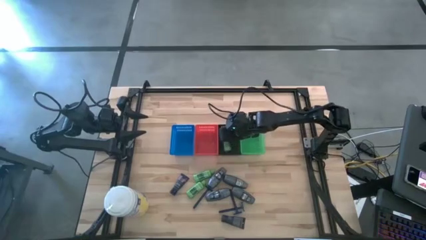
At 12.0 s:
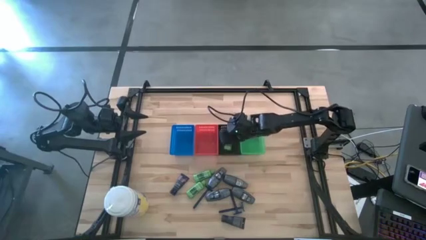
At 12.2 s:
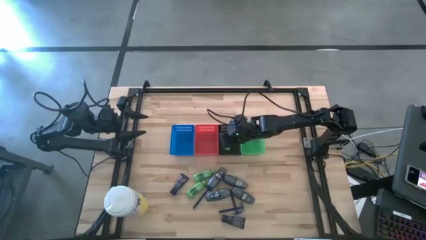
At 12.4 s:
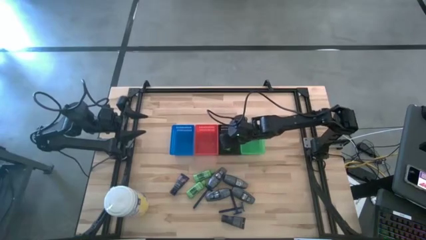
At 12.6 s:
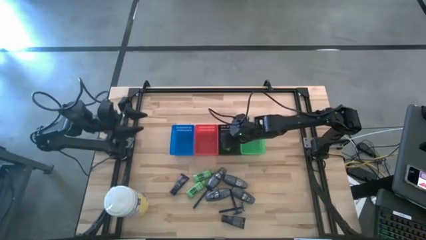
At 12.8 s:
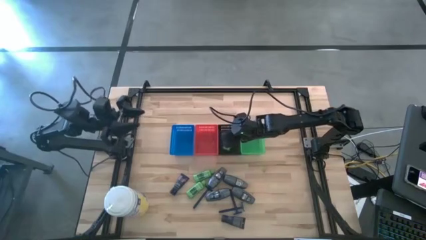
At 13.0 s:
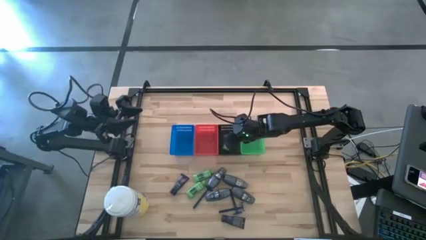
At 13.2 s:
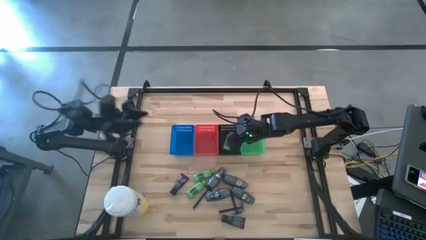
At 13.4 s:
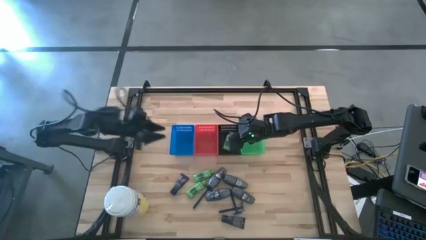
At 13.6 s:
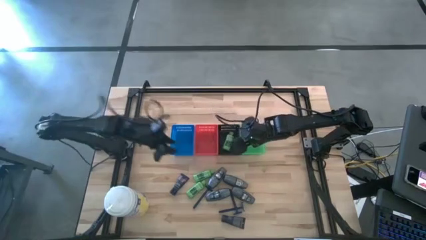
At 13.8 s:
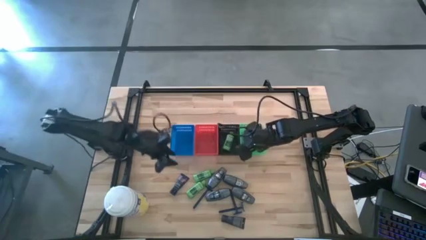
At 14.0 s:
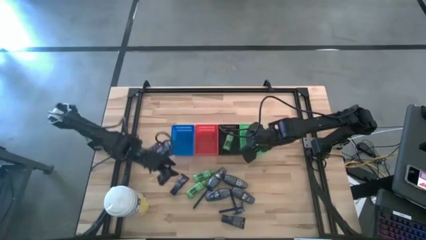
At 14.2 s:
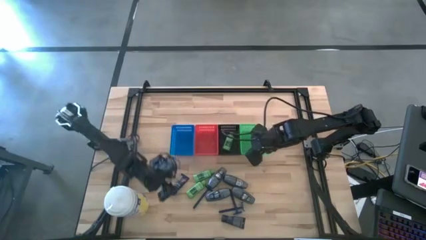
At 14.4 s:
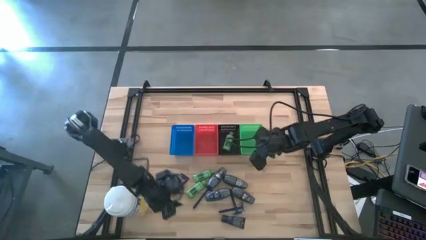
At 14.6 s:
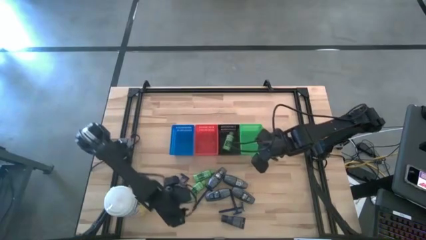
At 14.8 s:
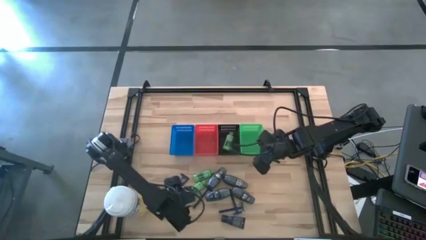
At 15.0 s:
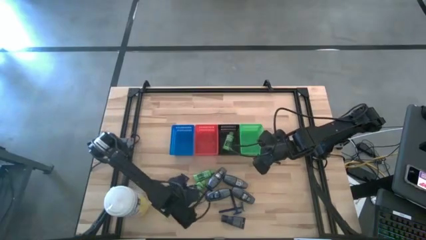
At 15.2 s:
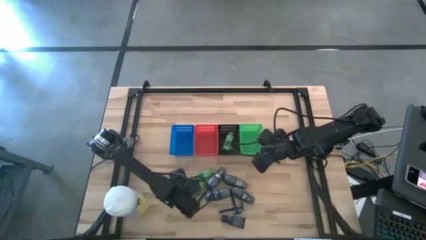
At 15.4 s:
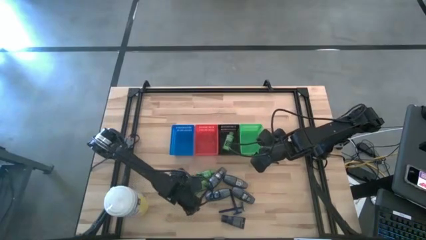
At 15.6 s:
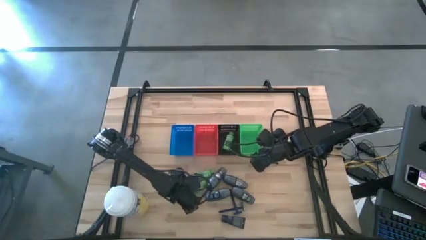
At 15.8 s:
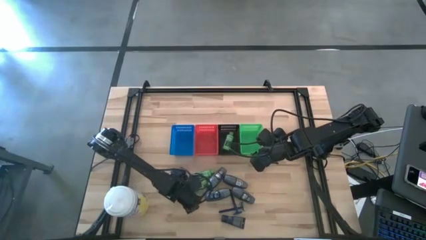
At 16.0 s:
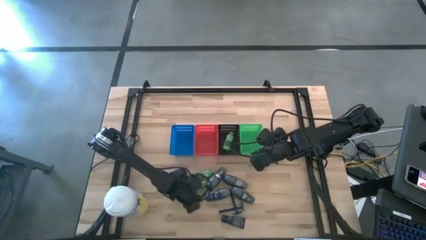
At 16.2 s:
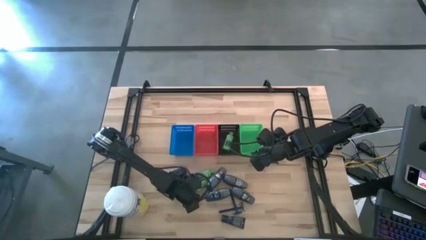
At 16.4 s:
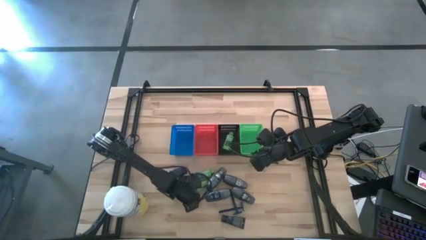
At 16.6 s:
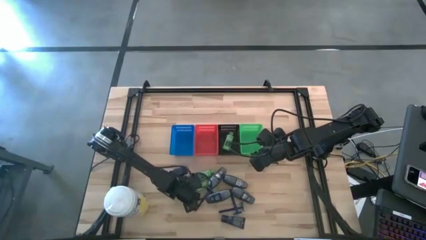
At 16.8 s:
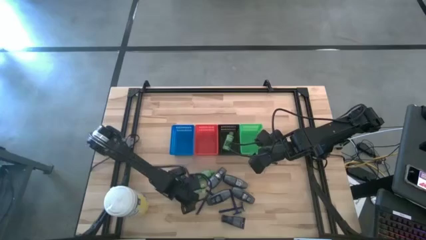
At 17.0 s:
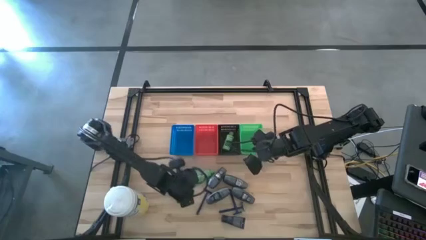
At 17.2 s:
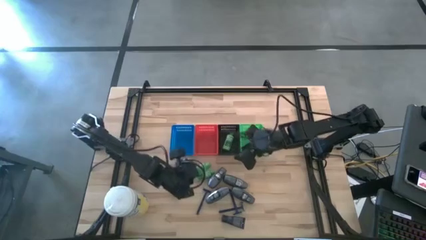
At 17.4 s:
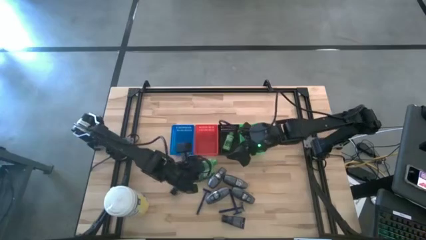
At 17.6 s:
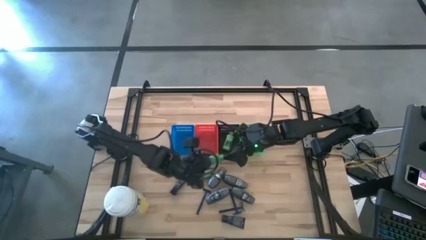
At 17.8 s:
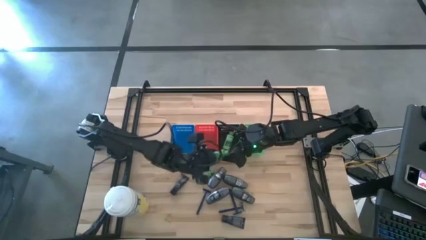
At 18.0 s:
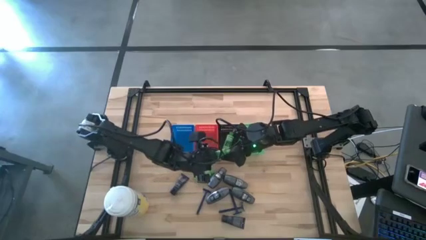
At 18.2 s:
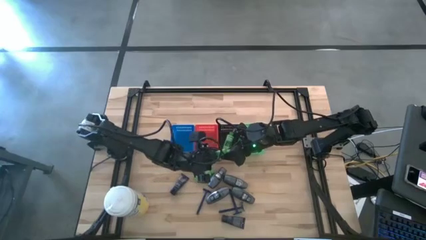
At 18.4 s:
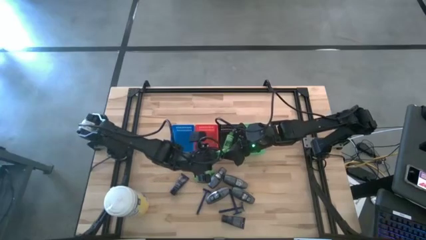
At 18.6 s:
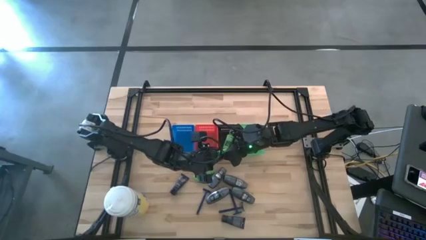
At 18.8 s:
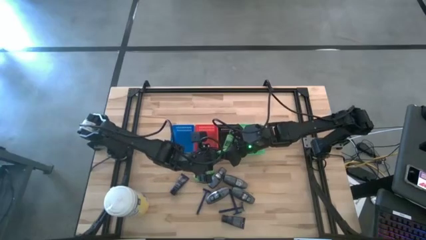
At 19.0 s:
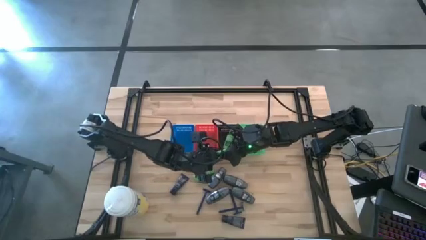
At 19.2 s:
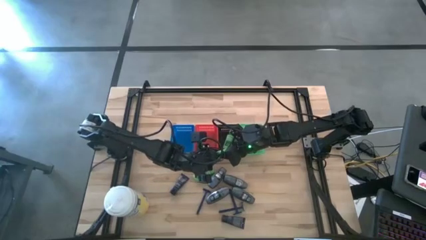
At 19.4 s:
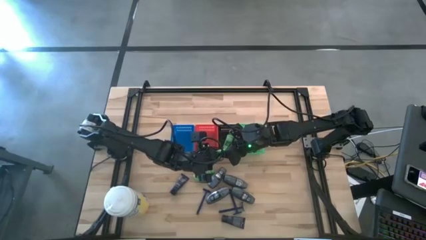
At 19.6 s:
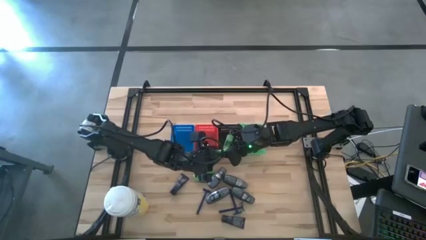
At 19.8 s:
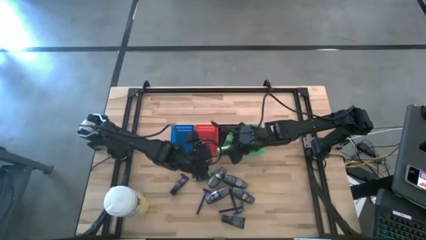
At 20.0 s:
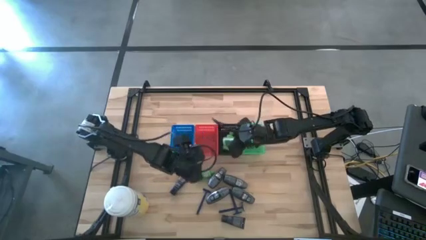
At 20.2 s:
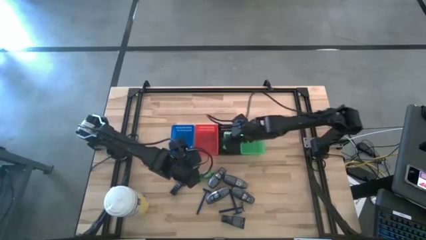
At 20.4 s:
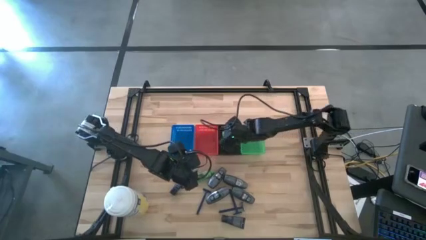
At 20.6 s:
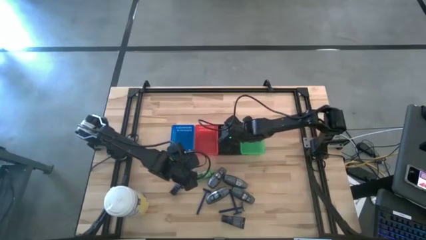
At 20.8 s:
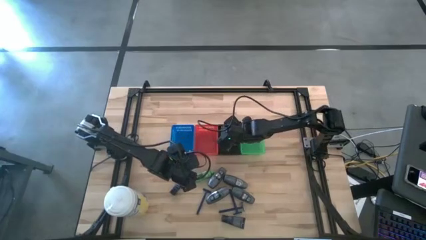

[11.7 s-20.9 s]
Task: Pick & Place Travel size toiletries
Put the shampoo into the black bin

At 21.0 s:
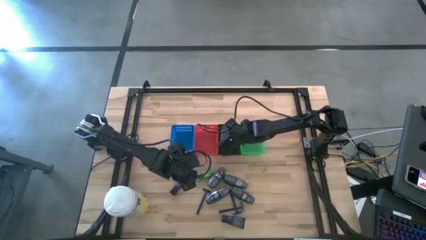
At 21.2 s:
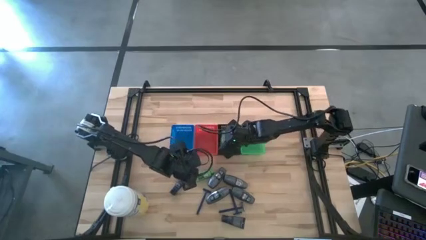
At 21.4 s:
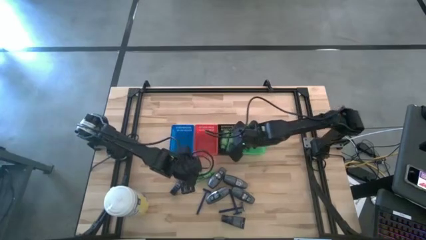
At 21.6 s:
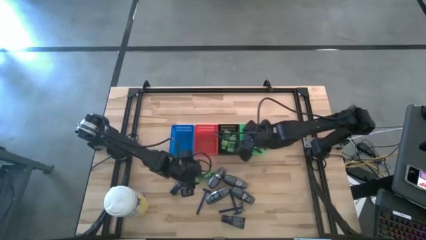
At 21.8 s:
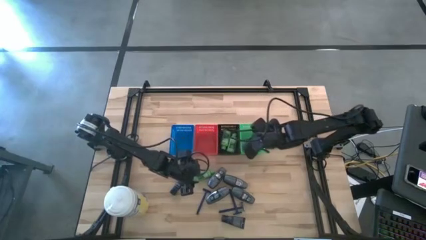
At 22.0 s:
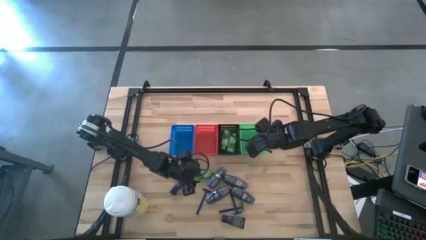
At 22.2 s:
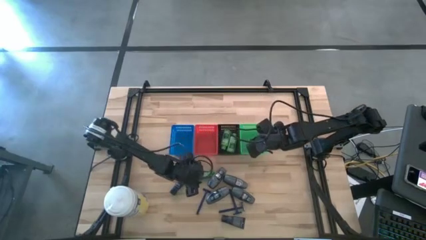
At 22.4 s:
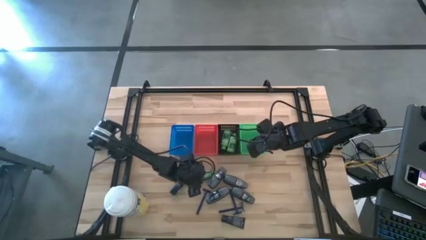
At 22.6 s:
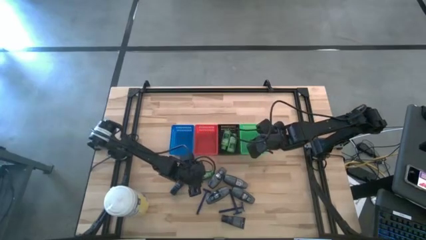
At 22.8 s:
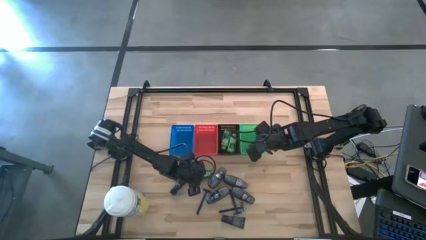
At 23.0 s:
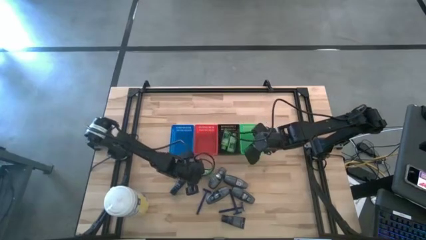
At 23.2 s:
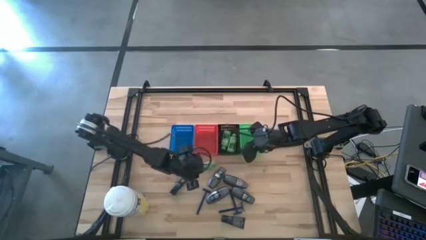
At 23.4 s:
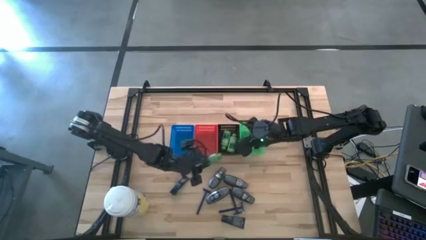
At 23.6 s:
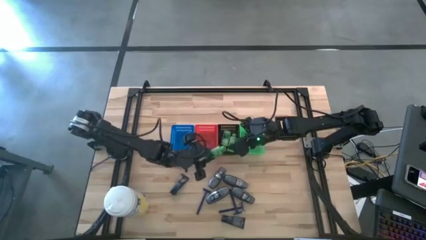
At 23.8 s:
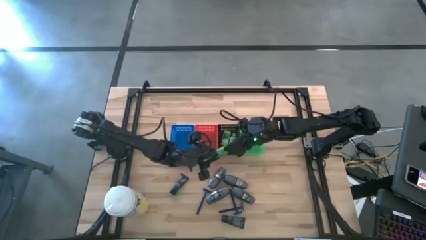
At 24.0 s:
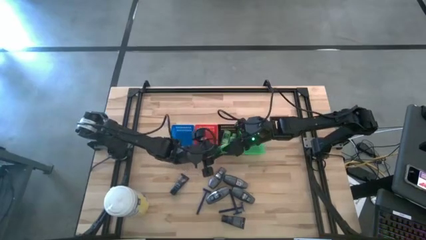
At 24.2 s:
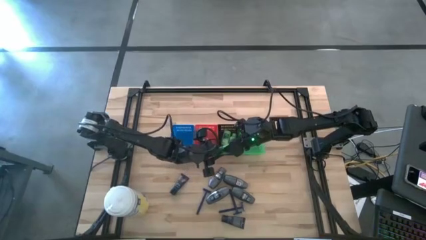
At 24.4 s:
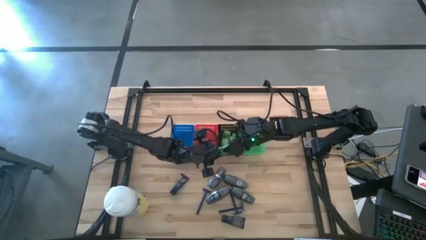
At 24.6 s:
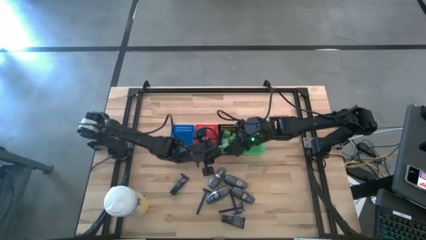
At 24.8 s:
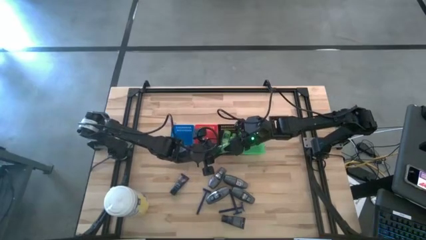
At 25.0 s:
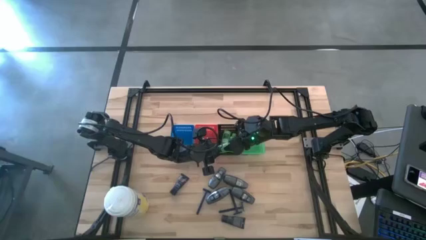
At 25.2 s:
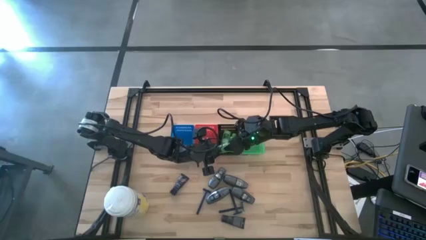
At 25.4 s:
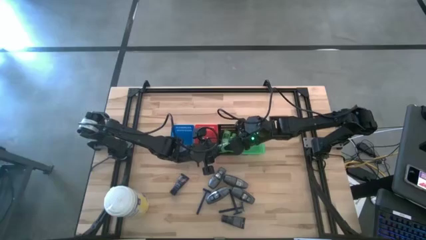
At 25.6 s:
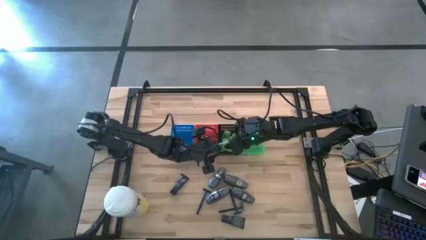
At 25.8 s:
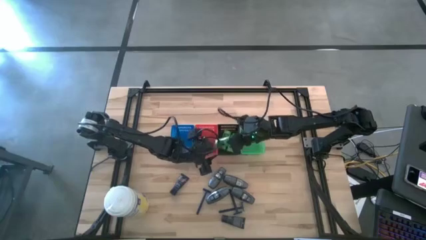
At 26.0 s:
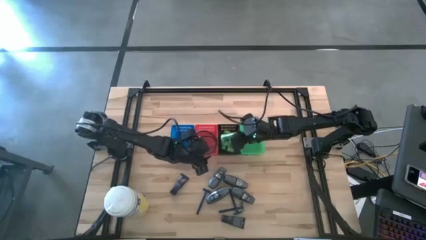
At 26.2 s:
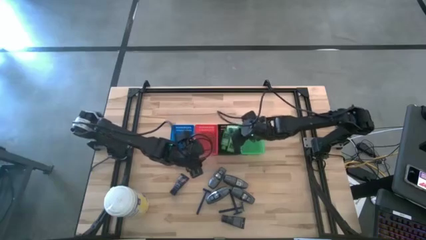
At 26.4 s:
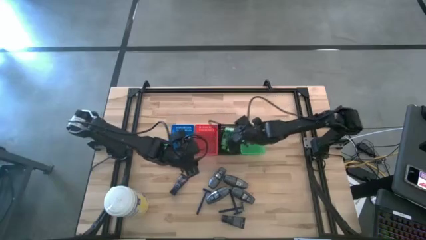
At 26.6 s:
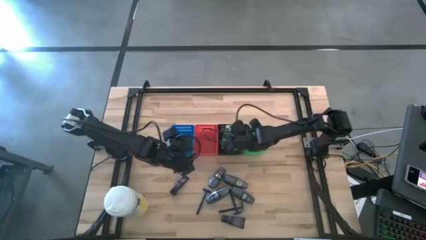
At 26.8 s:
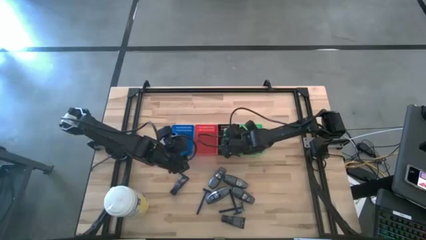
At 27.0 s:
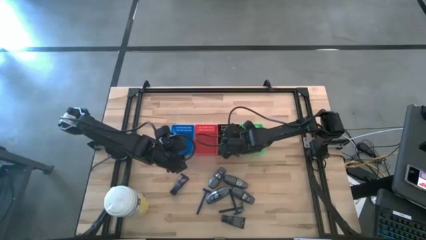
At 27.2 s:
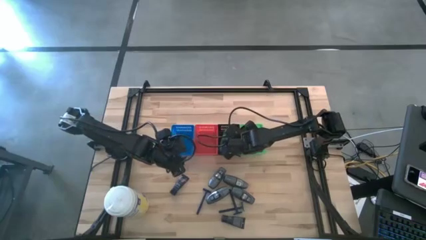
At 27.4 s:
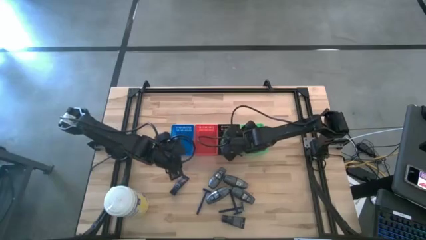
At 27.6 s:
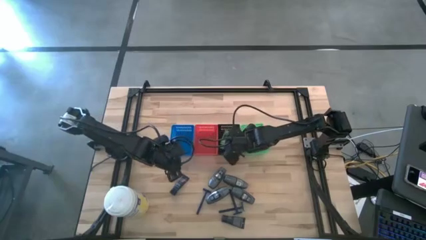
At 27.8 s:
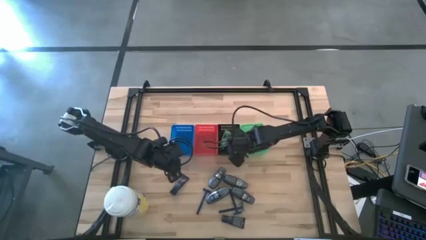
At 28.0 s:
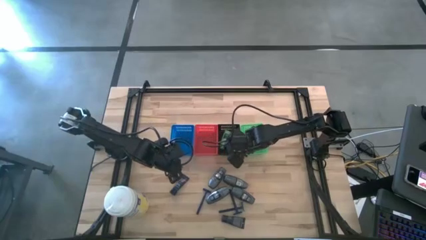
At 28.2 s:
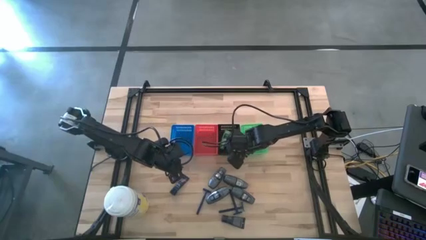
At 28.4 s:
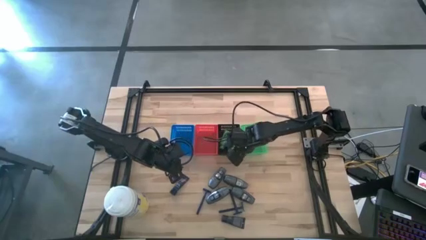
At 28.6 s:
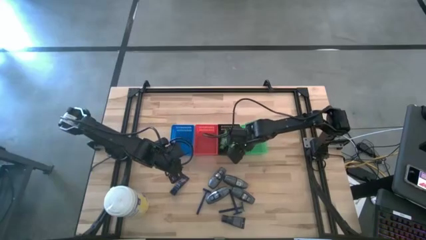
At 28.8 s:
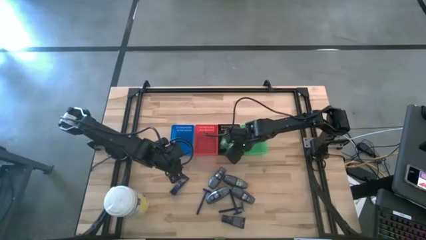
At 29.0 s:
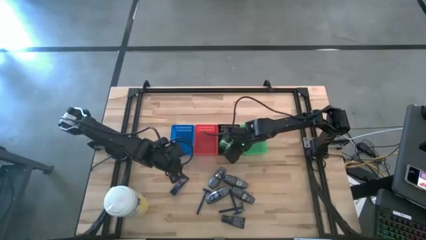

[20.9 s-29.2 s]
Put the shampoo into the black bin
